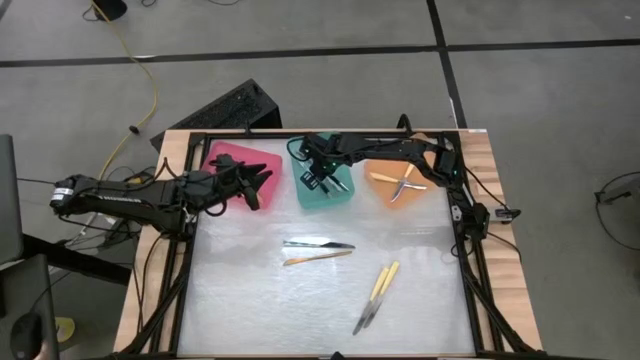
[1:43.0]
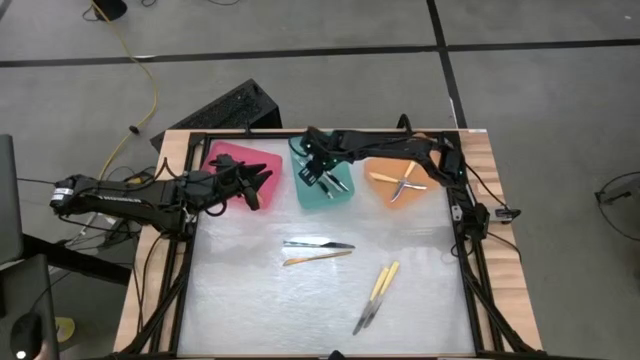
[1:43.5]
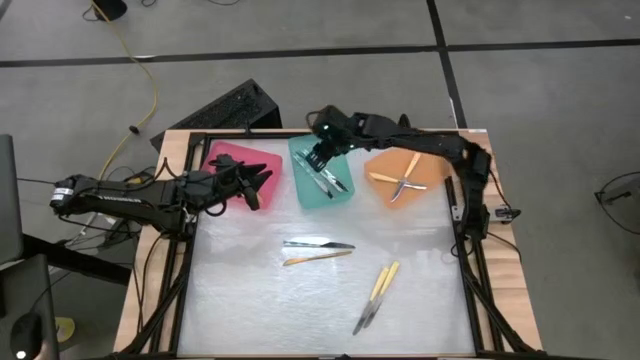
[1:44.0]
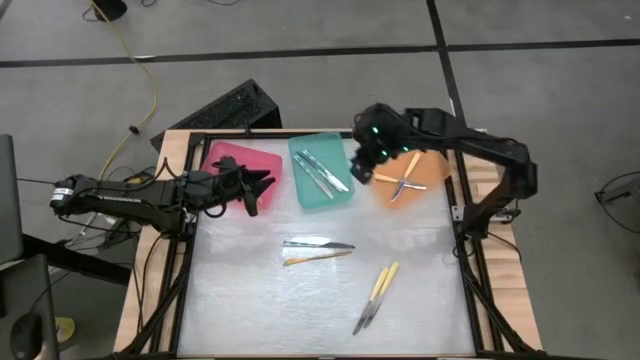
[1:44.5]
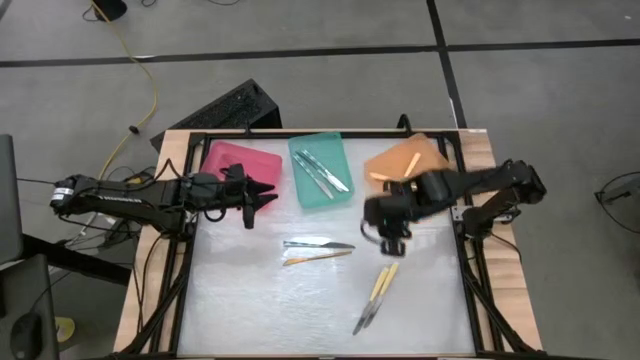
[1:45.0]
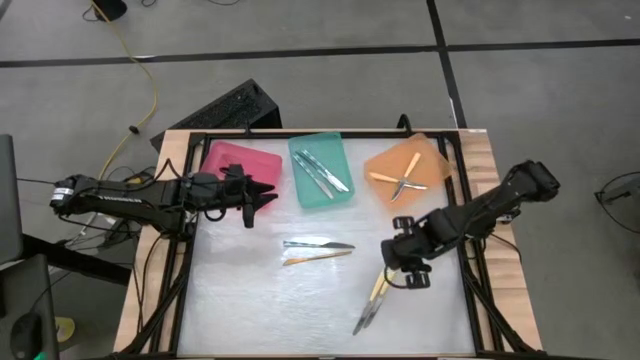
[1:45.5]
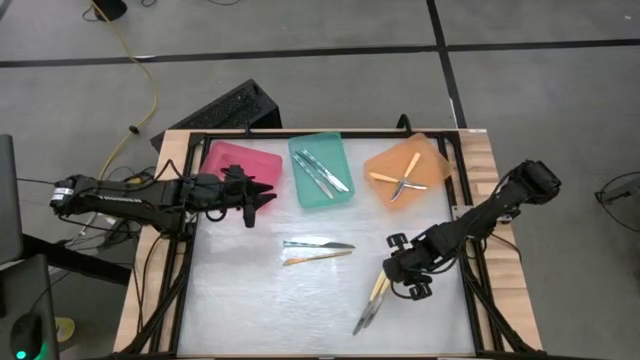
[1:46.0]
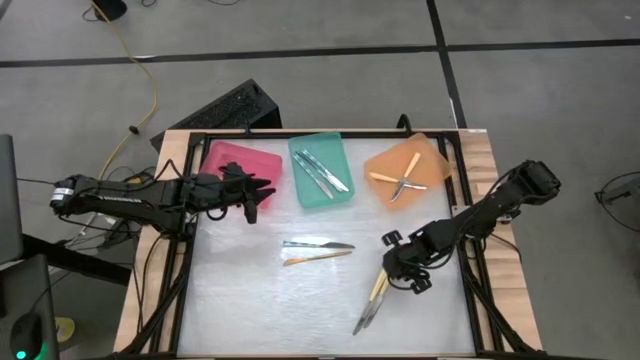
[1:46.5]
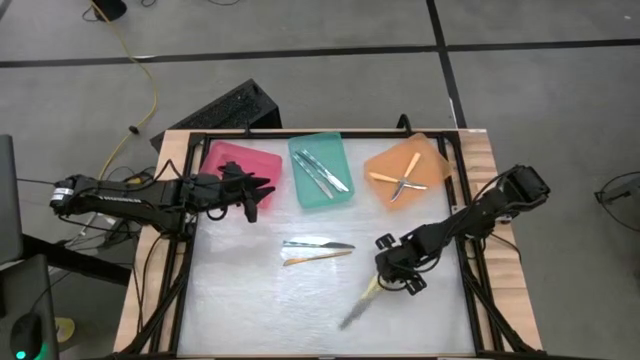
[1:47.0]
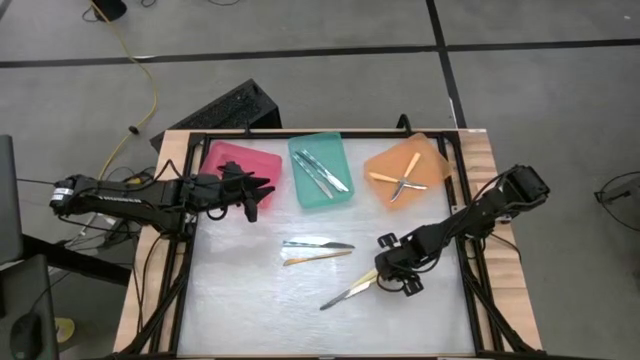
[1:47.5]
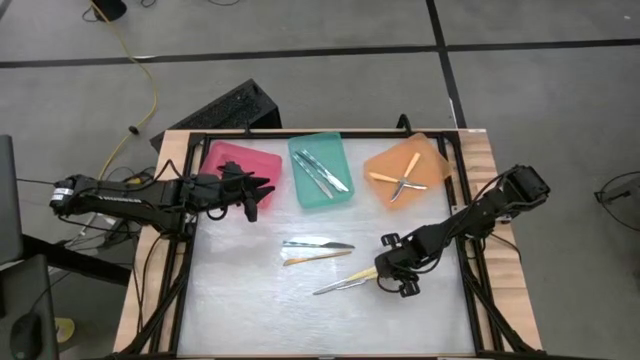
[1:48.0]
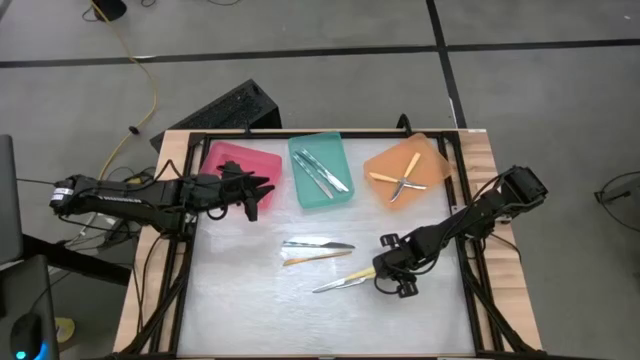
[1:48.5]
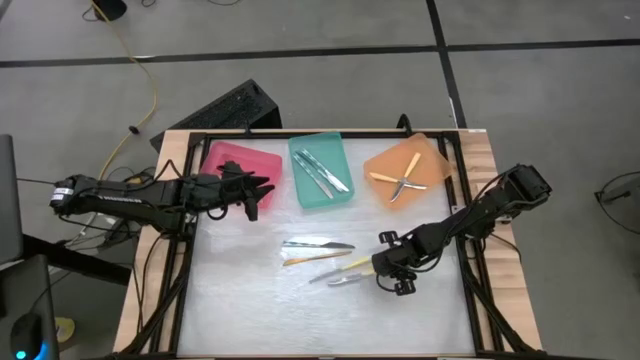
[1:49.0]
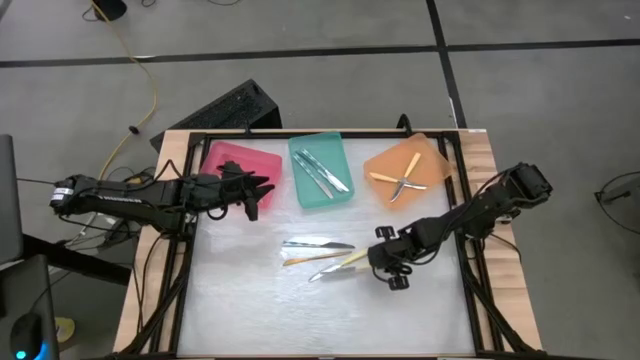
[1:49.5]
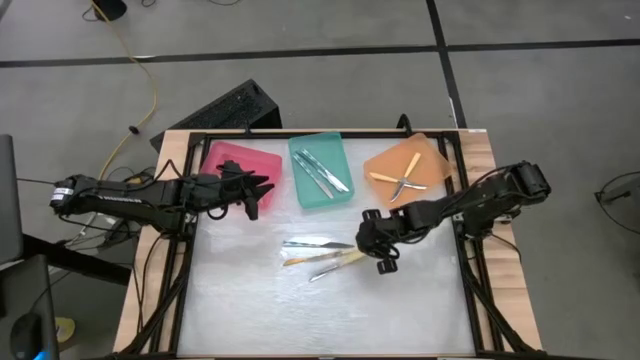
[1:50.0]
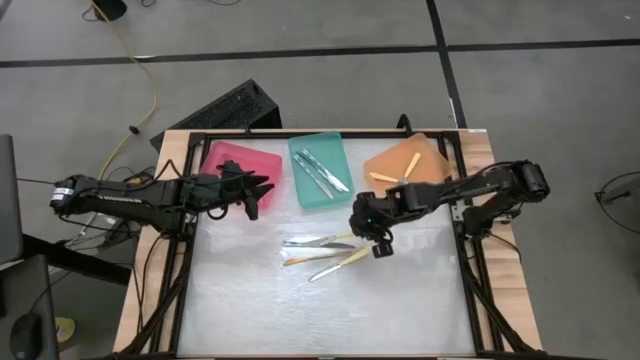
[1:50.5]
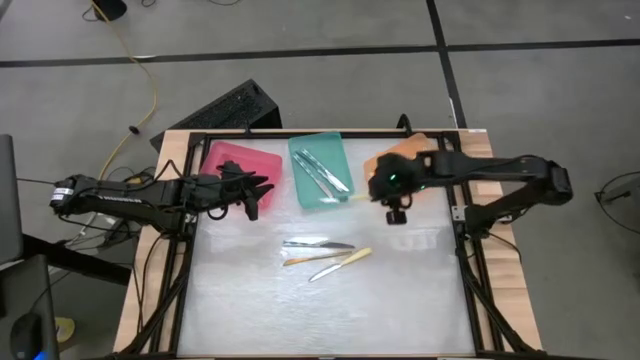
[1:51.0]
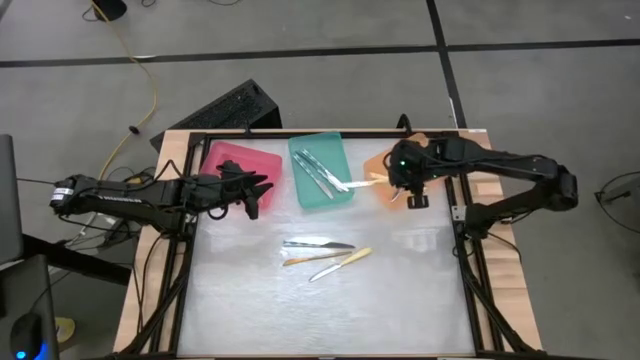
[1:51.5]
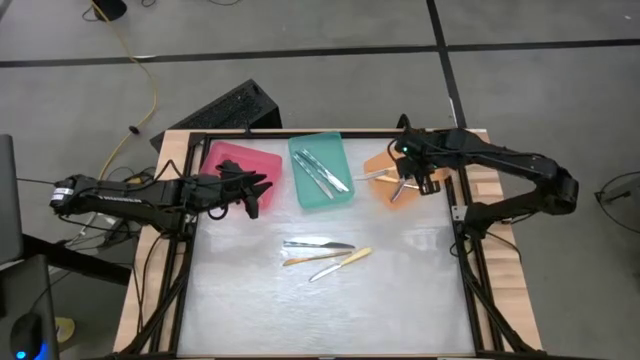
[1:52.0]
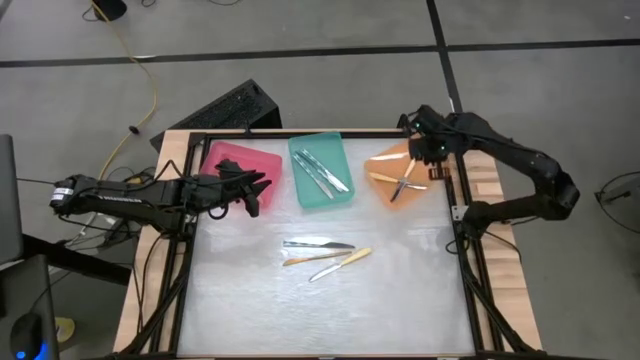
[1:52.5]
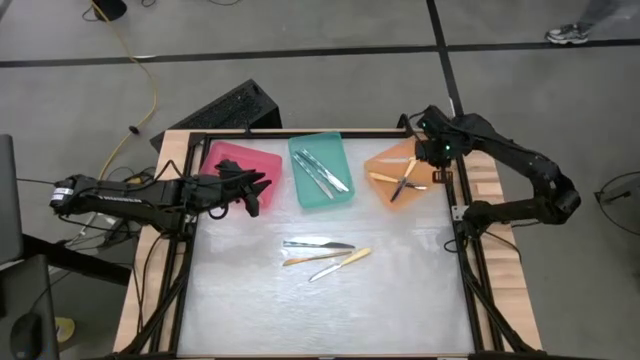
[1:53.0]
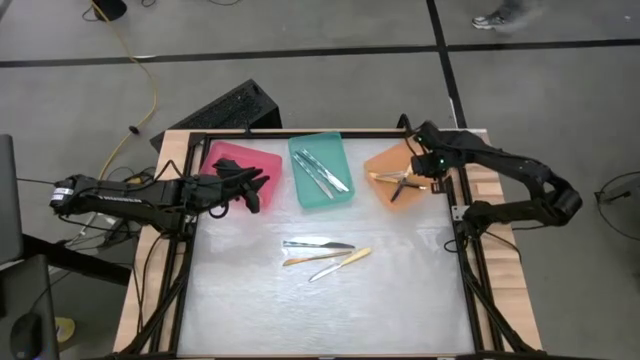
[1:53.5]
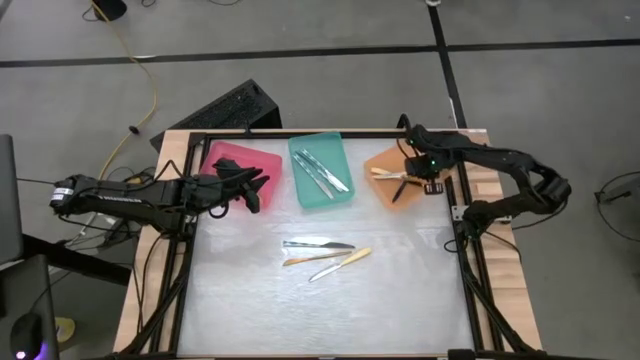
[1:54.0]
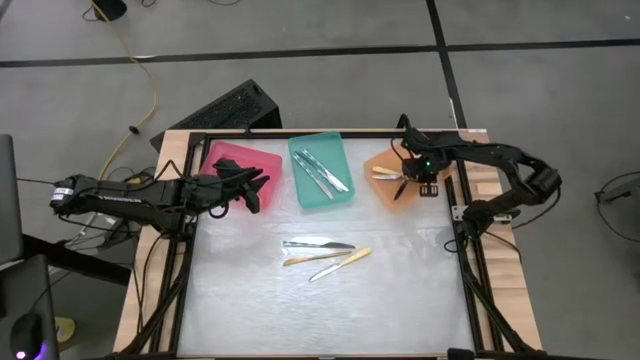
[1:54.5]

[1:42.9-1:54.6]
Task: Sort silverware by color (type)
Put the yellow knife into the orange bin

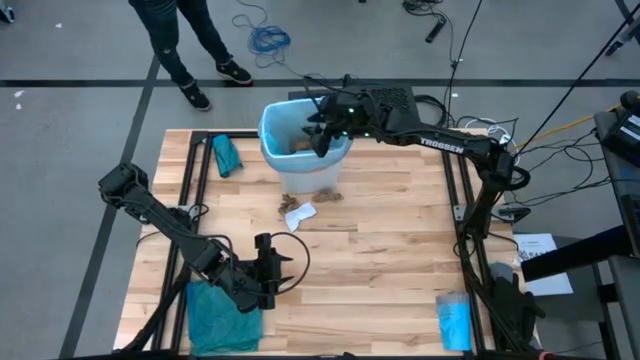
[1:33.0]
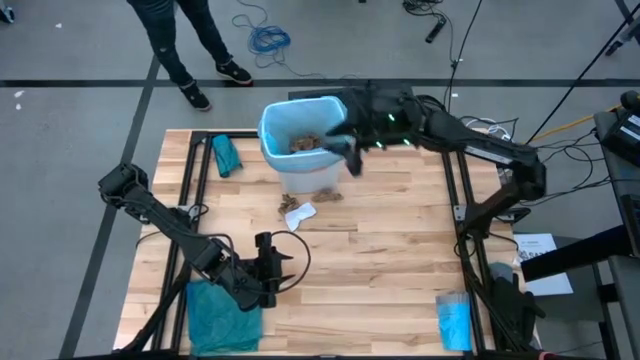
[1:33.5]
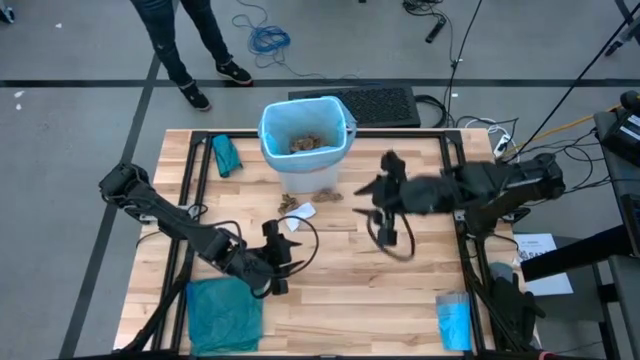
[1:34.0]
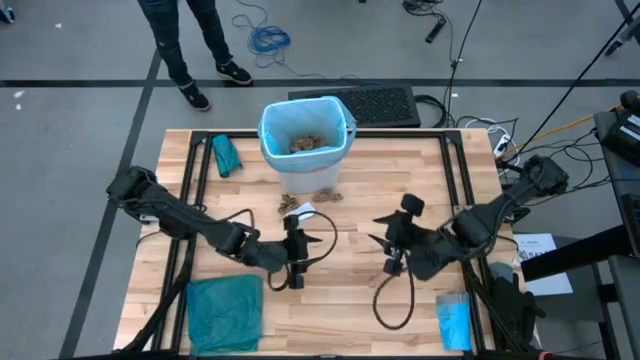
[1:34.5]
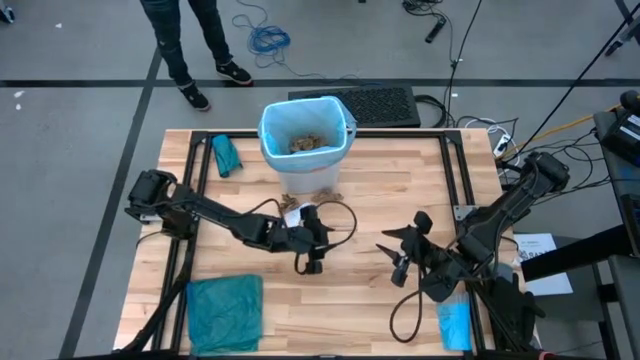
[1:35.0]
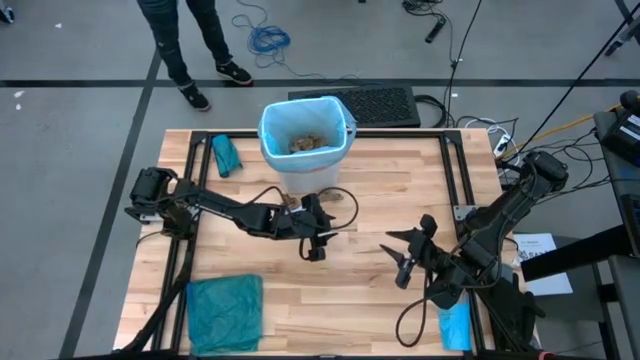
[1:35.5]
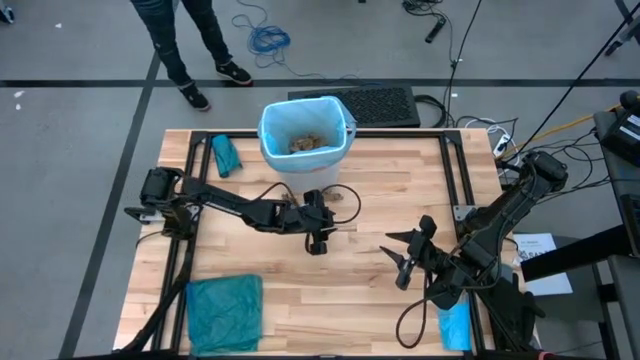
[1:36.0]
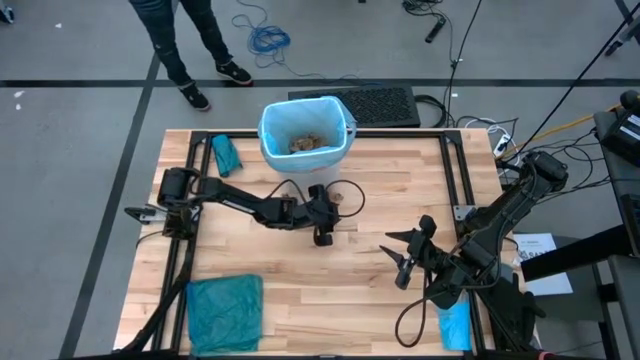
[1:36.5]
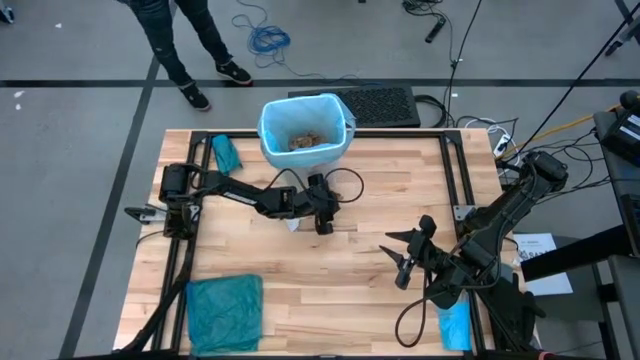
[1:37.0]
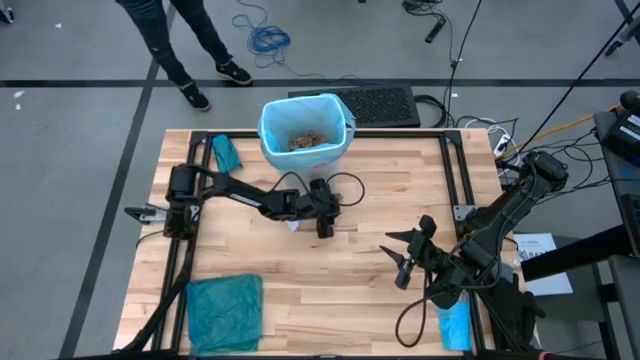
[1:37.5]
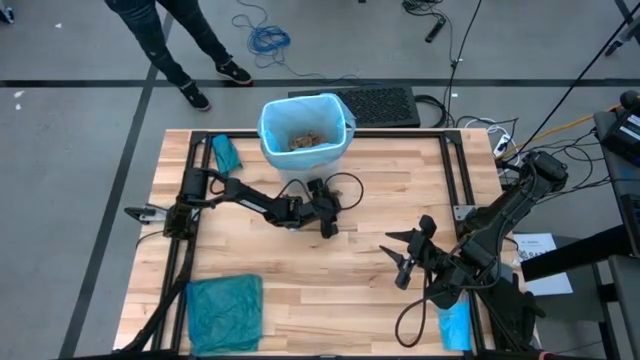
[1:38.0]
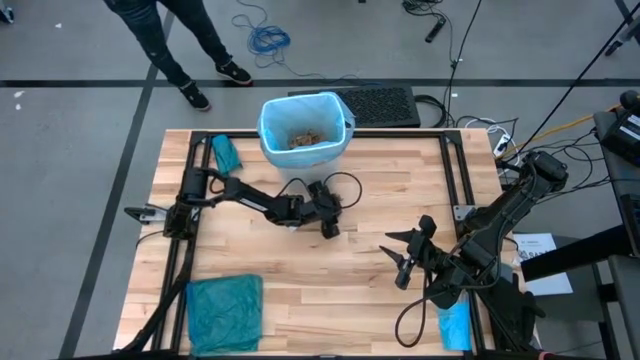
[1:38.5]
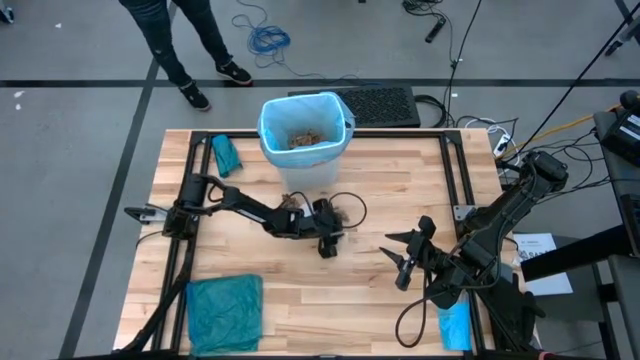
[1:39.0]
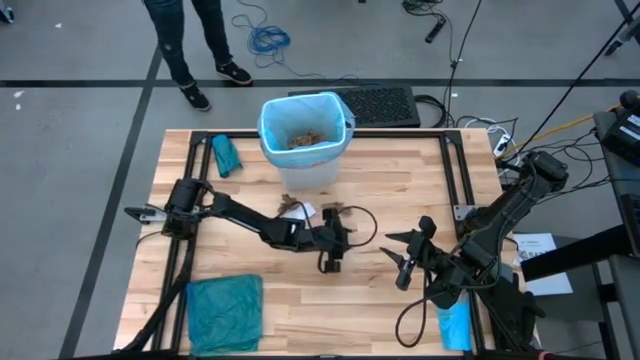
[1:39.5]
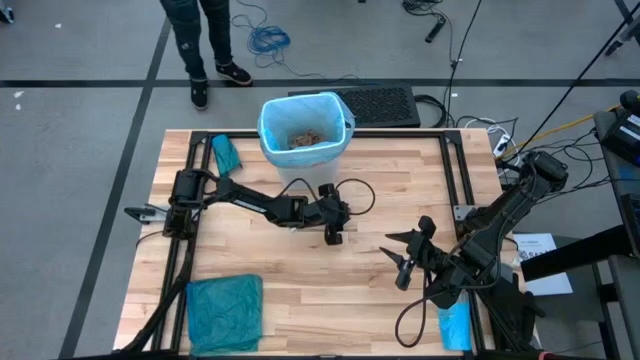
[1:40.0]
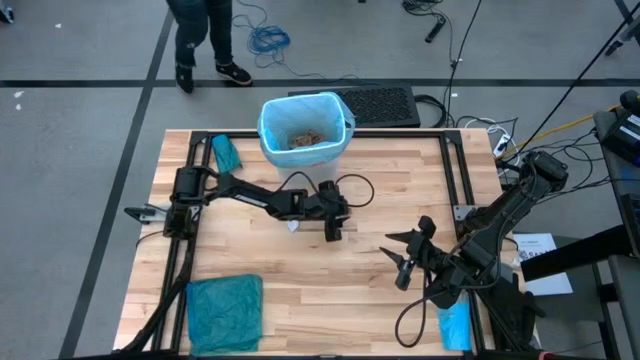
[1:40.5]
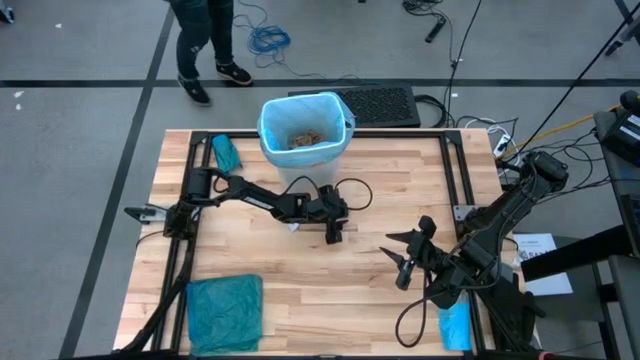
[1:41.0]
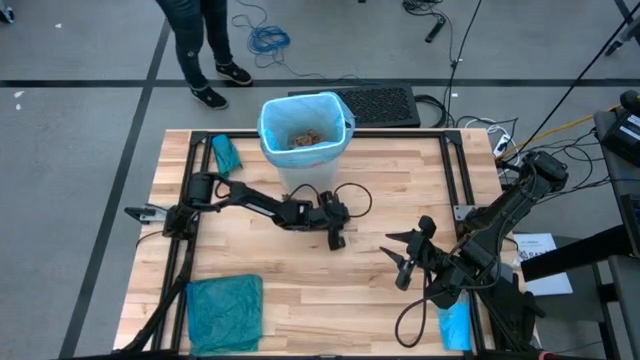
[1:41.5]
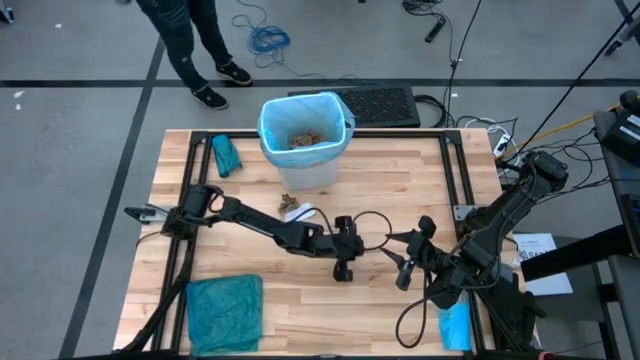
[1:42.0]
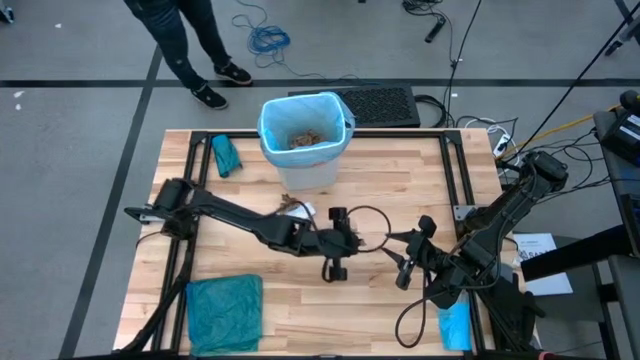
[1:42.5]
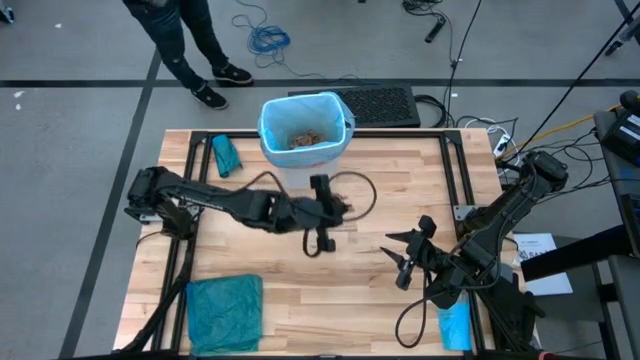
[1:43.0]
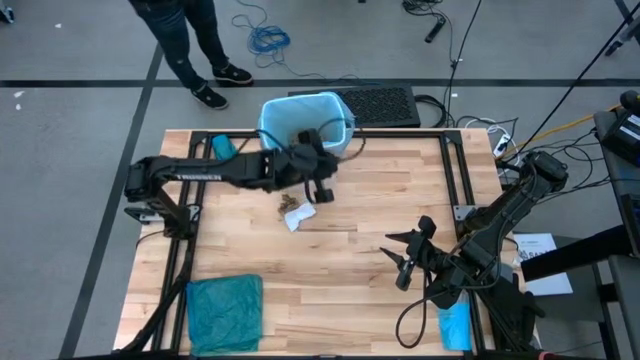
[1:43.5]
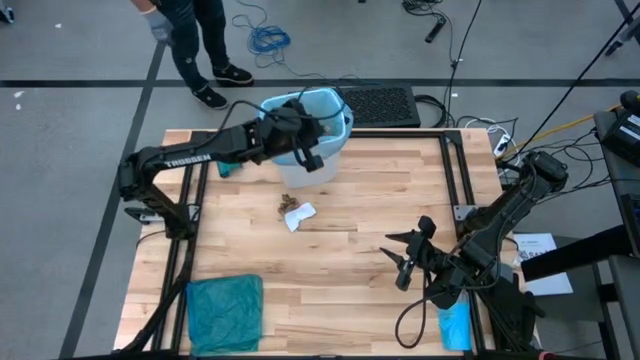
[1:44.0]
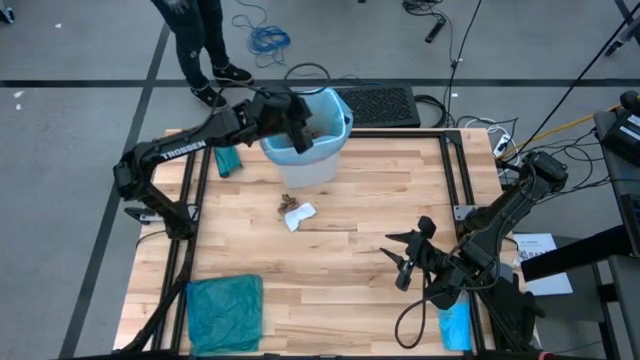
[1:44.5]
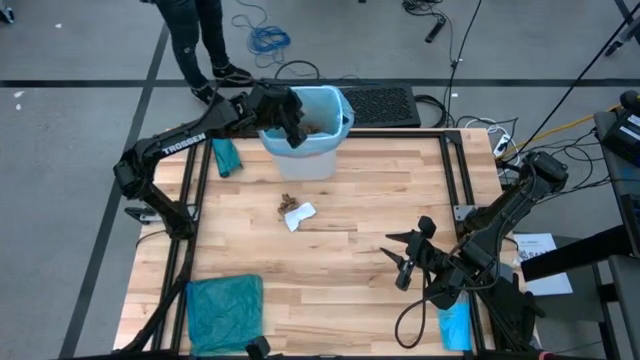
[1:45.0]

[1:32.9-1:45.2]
Task: place trash/remove bag and relplace
Put the brown paper into the blue trash bag inside the white trash bin
